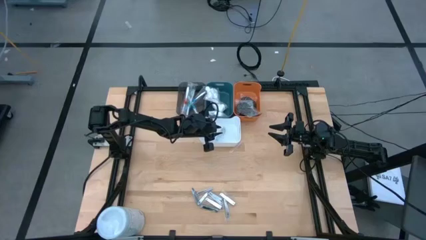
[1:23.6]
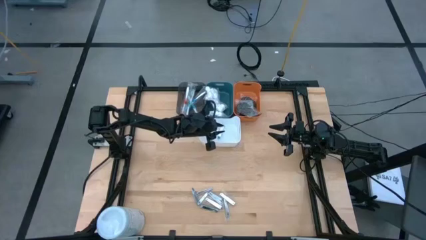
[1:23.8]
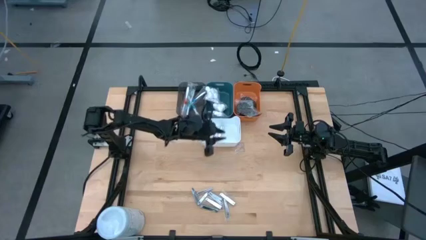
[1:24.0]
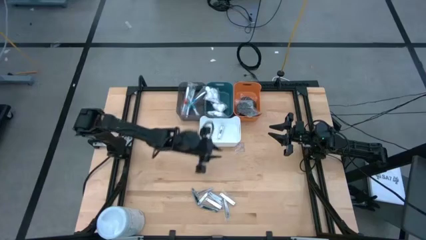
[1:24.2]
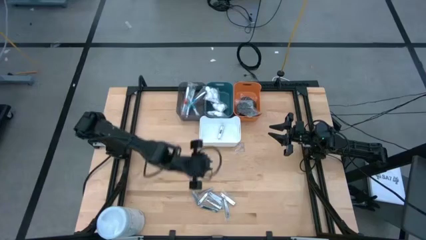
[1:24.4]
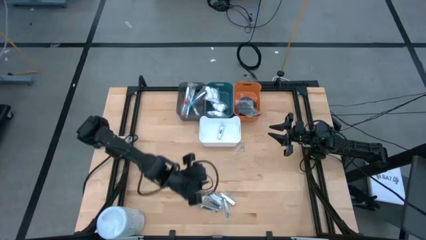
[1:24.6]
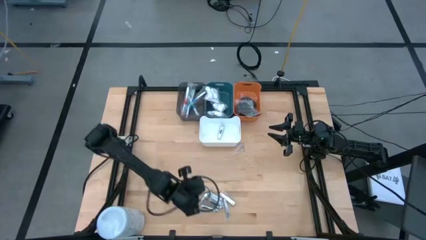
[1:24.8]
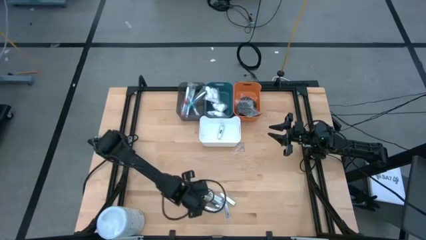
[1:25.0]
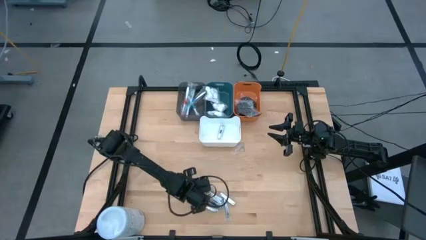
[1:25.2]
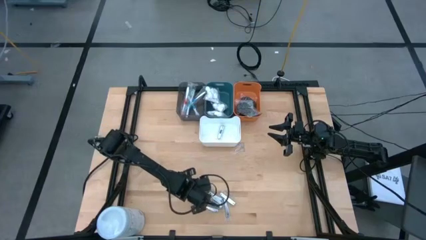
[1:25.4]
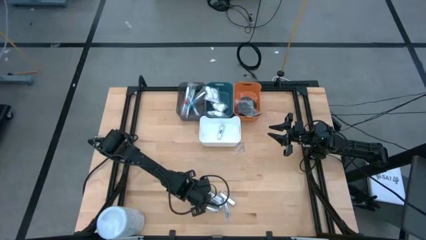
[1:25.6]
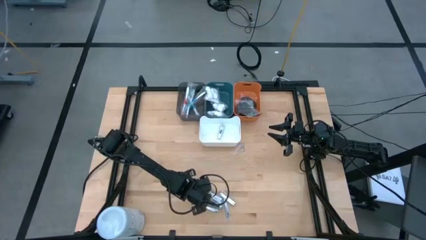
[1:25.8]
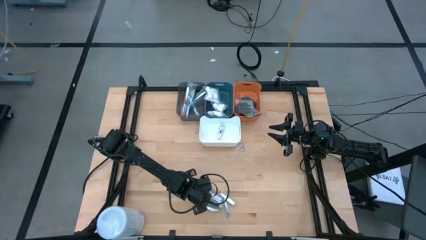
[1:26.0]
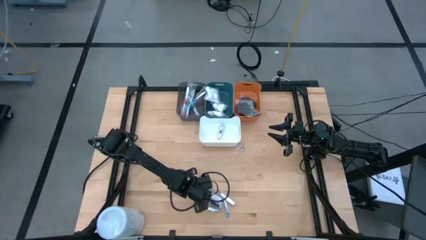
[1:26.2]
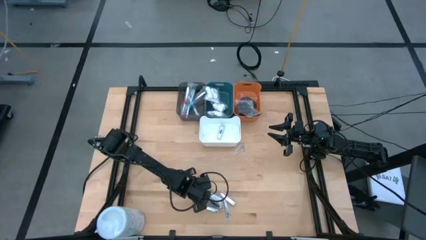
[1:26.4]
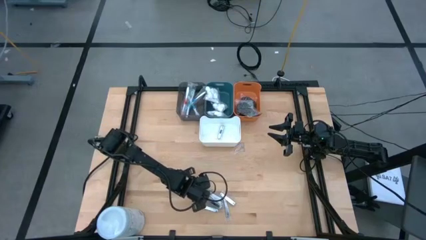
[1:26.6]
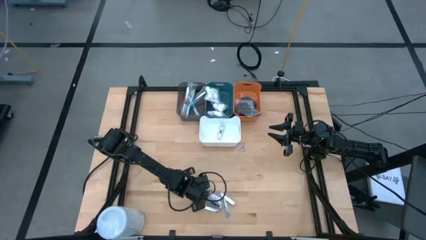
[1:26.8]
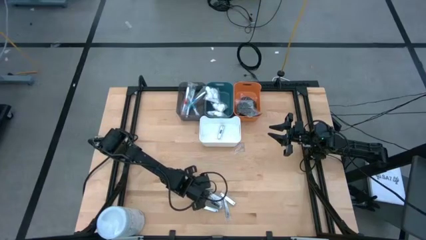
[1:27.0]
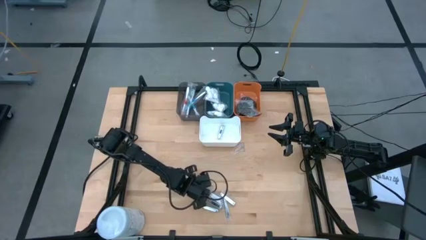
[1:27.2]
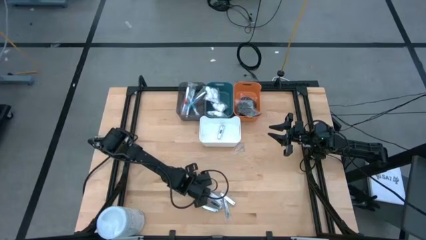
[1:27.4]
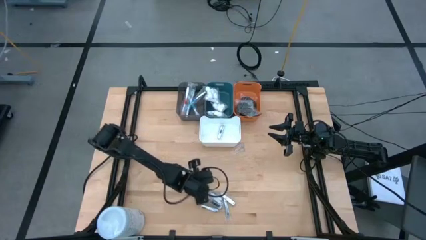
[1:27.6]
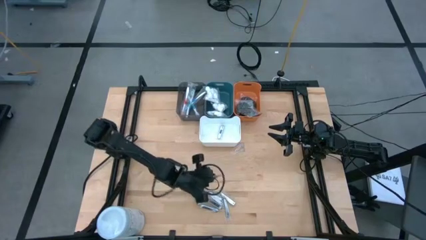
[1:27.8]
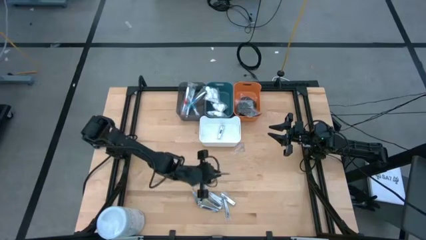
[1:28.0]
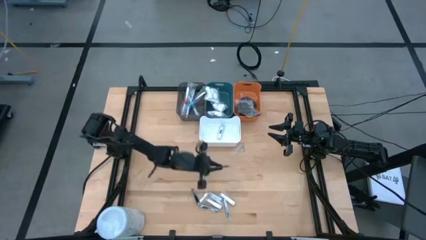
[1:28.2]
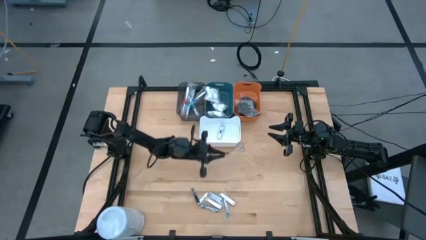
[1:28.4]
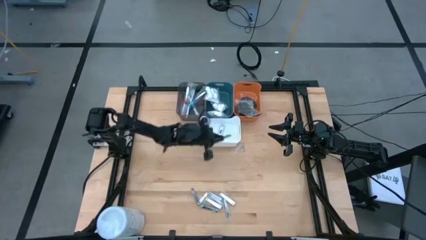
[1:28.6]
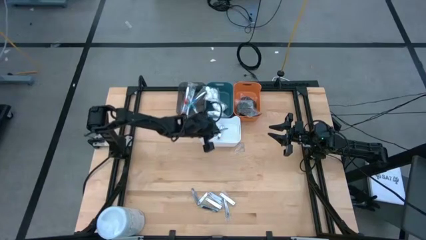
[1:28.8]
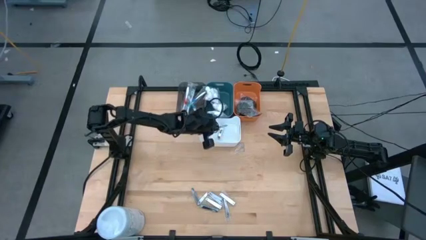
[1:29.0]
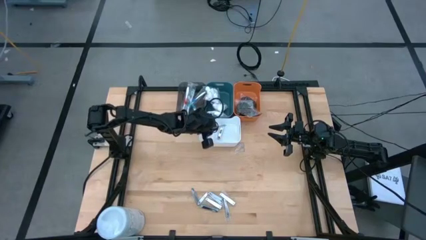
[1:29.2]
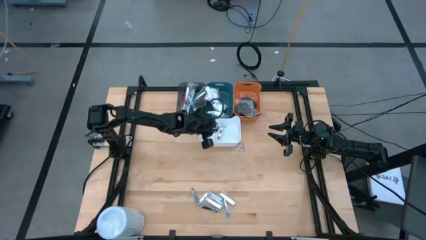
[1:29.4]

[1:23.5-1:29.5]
Task: Pick & Place Travel size toiletries
Put the silver nail cutter into the white bin

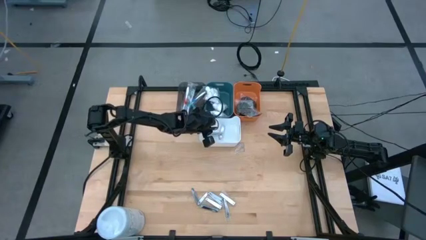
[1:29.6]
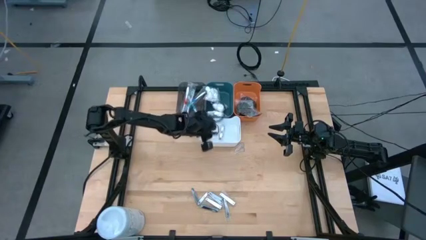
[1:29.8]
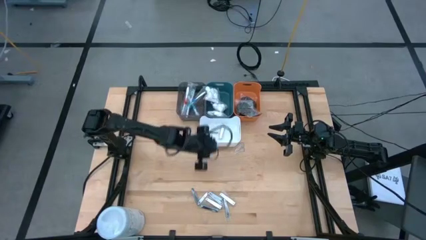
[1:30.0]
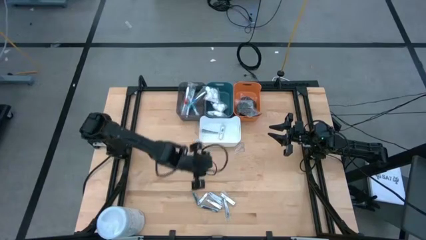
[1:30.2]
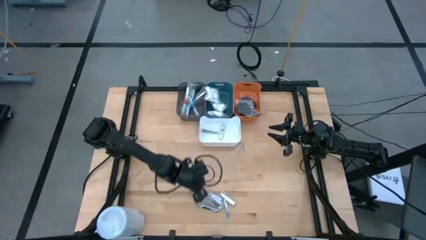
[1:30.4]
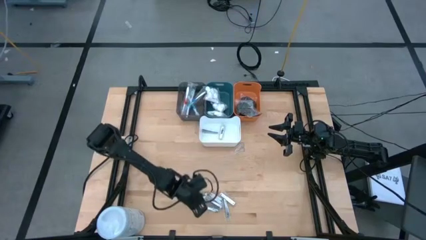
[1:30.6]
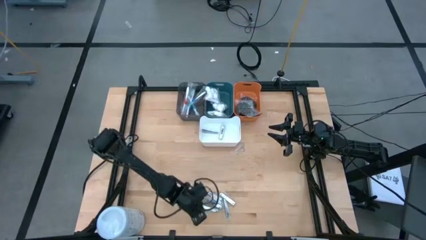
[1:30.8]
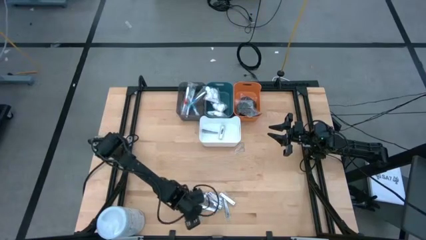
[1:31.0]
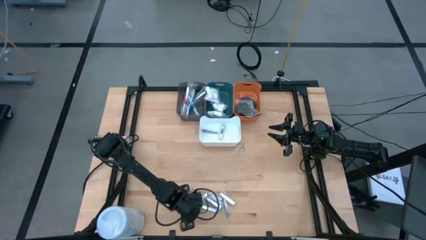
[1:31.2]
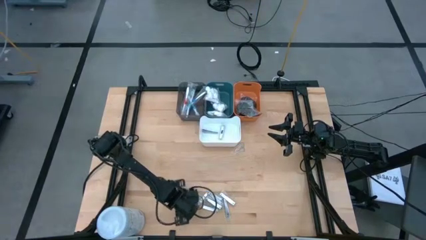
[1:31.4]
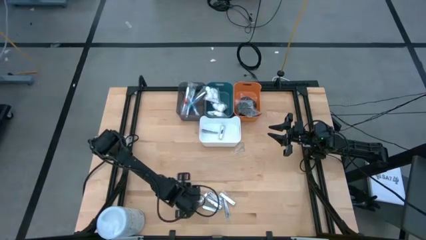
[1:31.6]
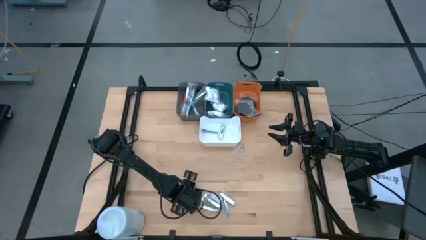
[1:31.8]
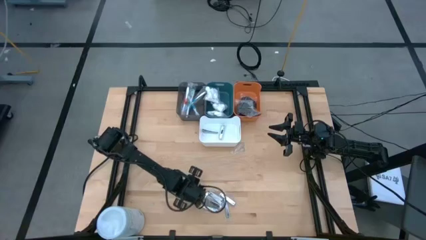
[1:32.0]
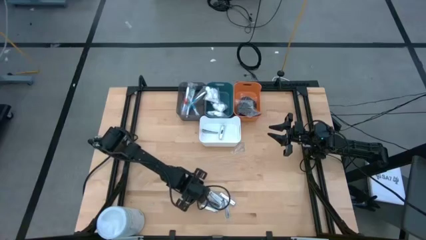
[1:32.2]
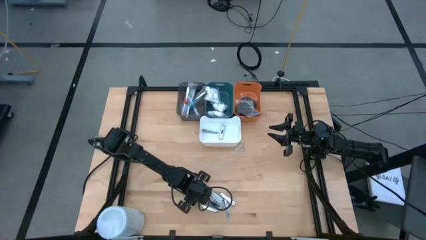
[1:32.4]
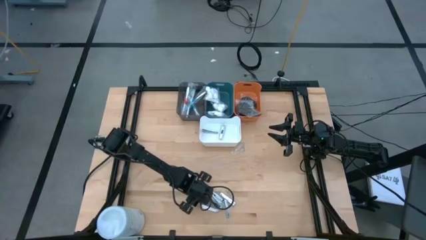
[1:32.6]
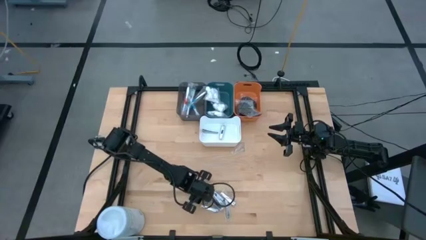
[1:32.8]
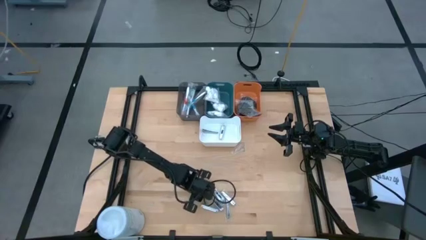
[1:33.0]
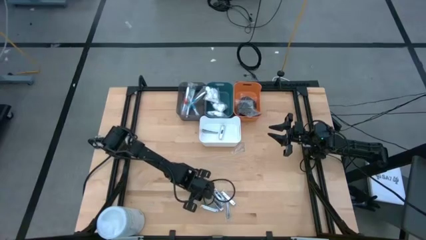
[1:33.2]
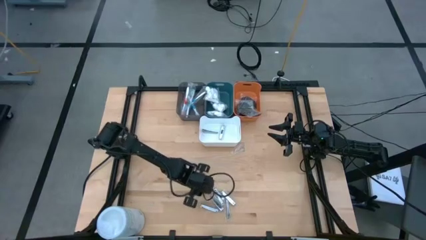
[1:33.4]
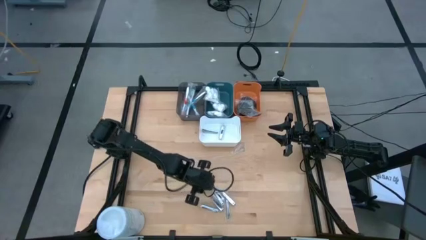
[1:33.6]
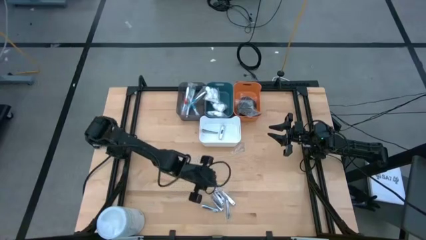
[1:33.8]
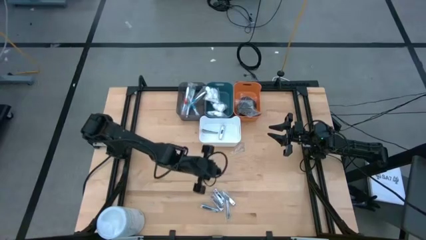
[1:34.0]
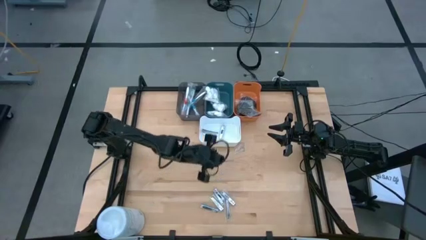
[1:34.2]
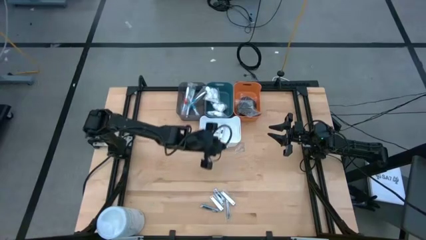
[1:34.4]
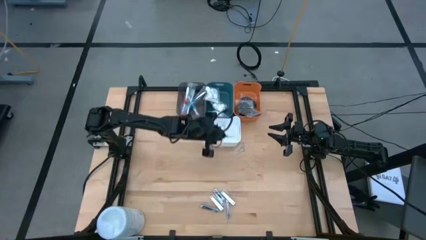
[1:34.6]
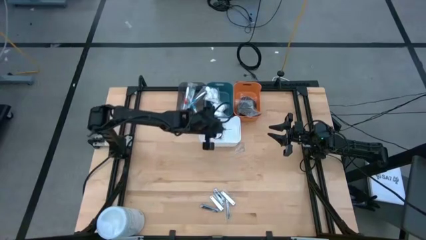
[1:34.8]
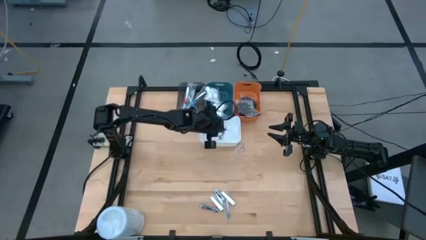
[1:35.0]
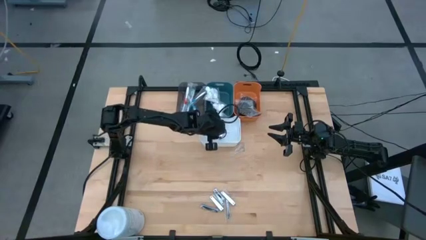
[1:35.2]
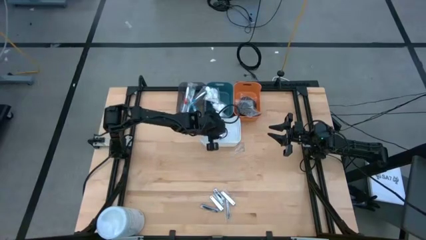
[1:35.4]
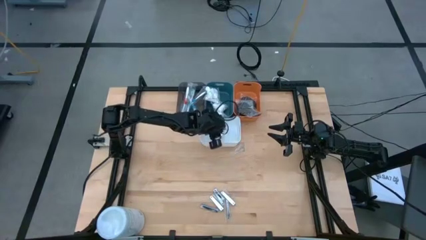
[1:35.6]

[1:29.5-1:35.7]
Put the silver nail cutter into the white bin

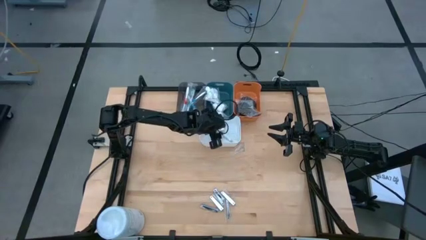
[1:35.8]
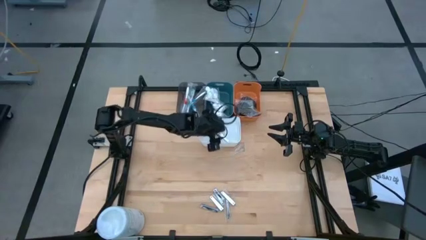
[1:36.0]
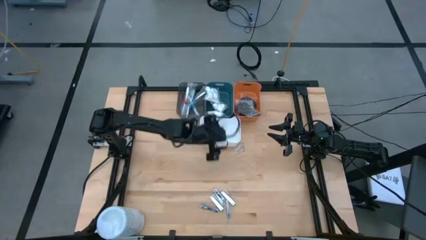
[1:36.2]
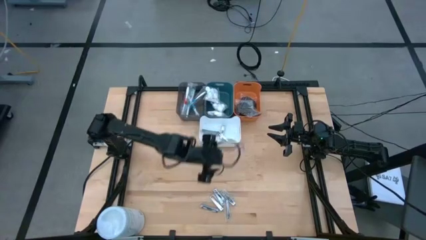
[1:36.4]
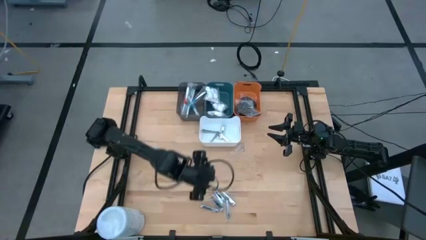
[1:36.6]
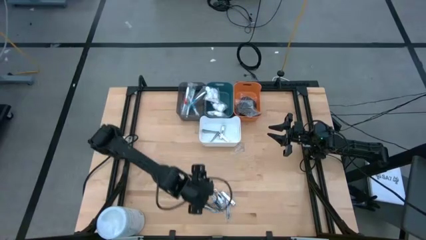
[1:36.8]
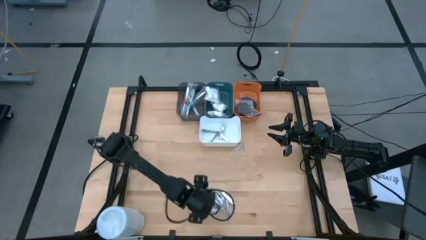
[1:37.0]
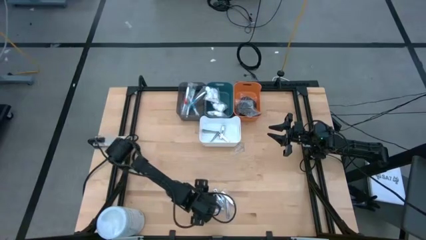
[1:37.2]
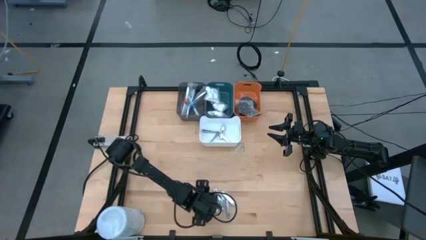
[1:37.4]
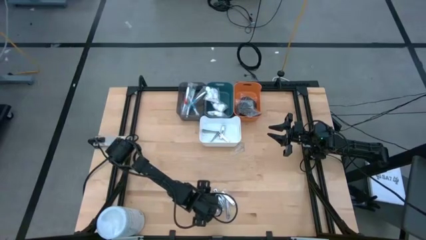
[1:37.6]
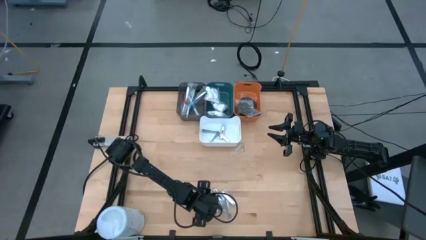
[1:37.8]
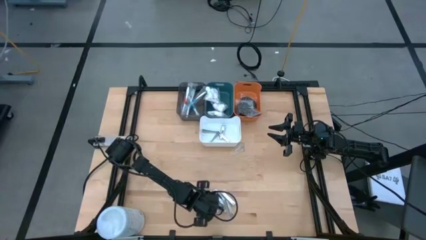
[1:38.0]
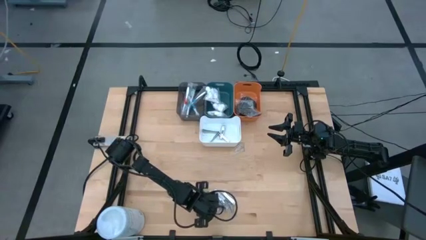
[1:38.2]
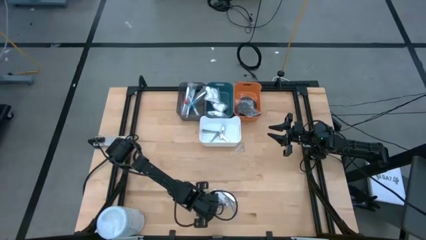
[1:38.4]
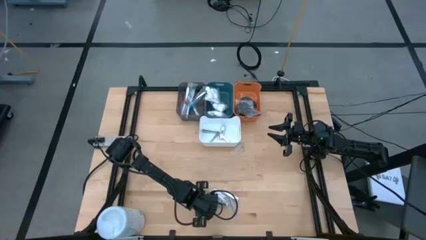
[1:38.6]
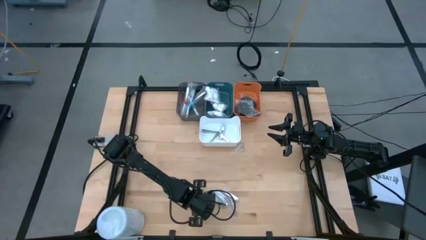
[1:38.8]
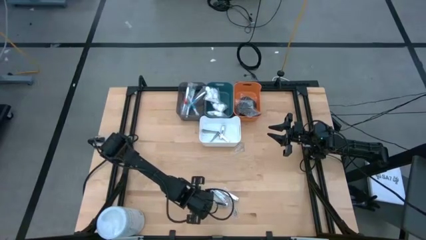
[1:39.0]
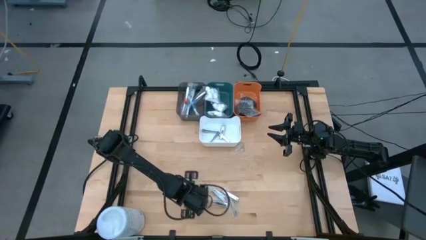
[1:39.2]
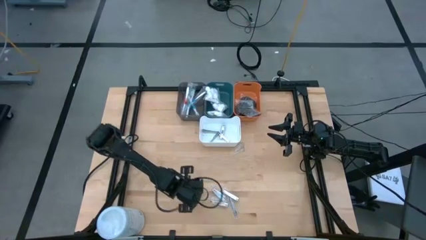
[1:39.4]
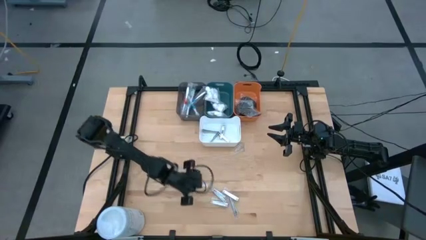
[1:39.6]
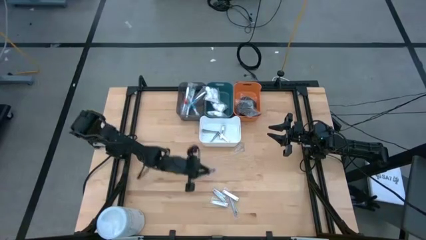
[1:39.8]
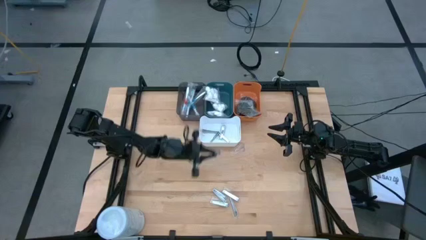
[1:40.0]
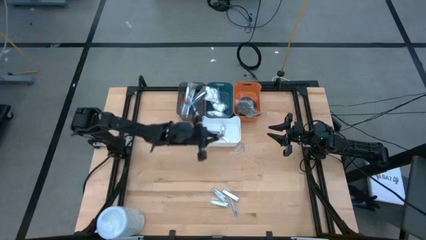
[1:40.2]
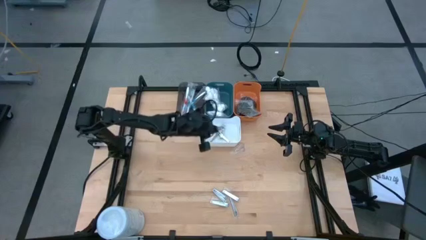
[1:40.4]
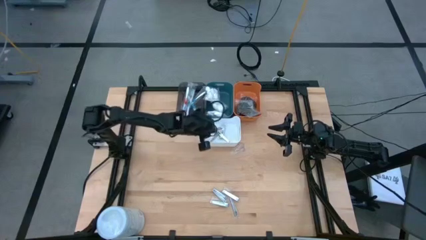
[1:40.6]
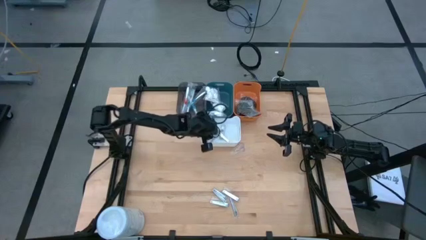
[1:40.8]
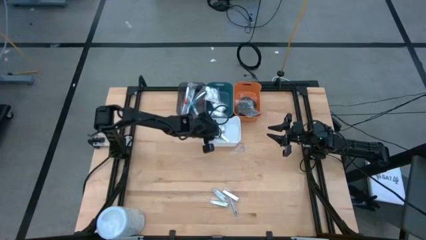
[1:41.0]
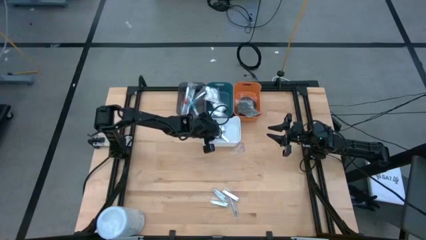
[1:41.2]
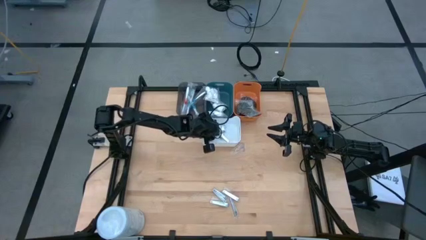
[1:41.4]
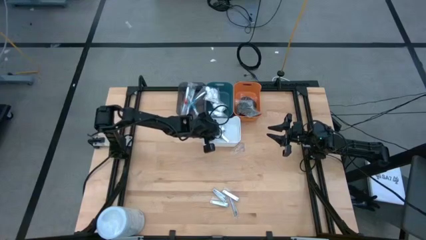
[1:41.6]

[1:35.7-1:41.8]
Put the silver nail cutter into the white bin
